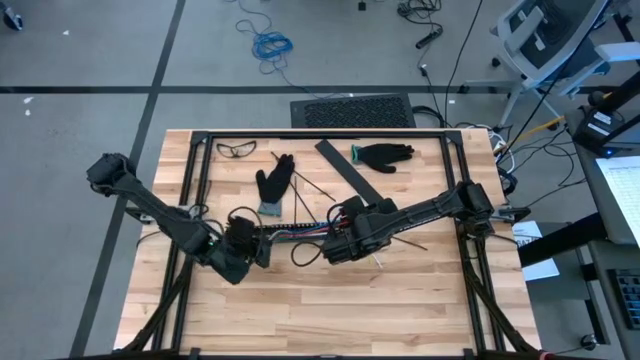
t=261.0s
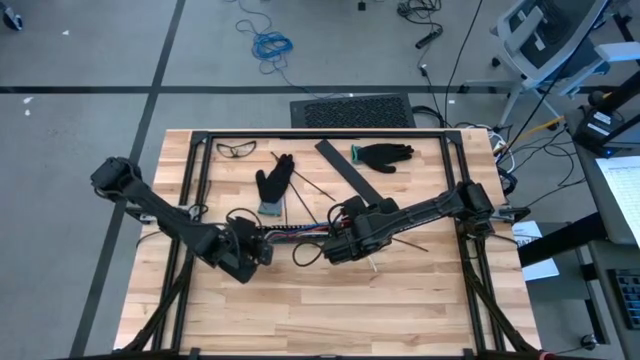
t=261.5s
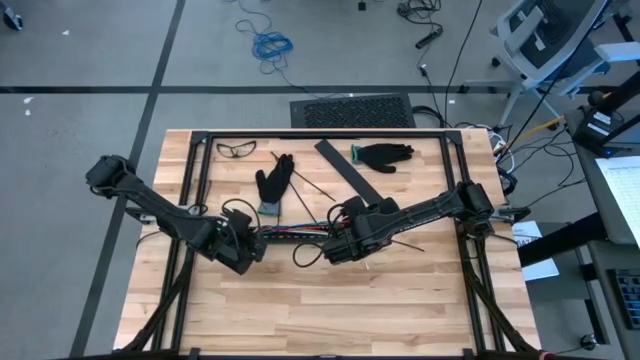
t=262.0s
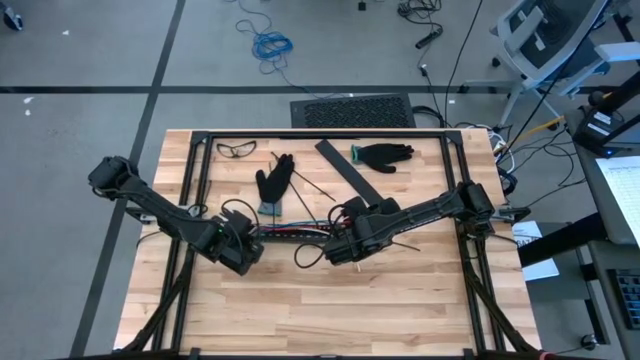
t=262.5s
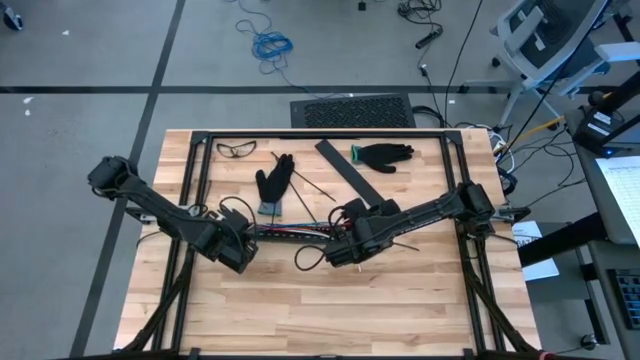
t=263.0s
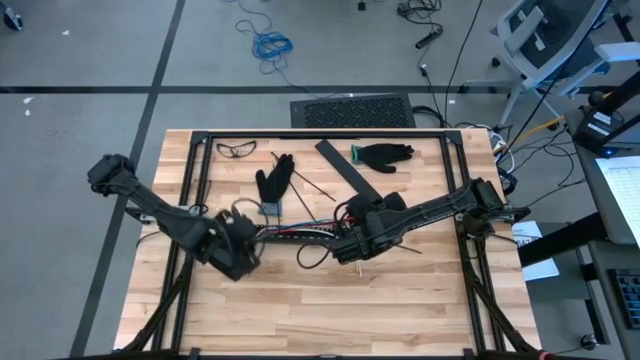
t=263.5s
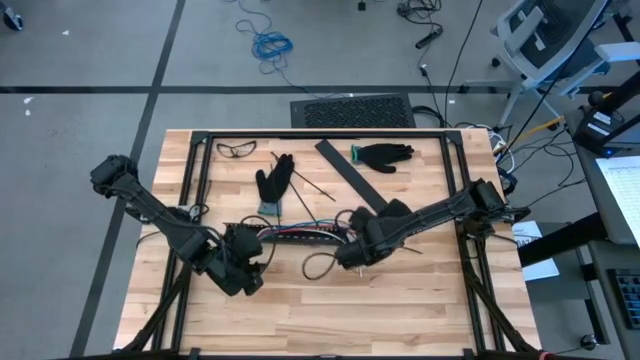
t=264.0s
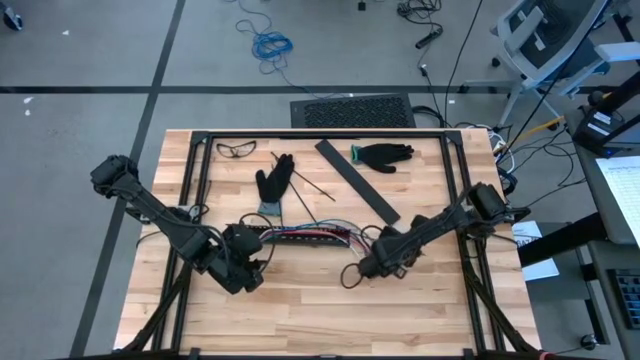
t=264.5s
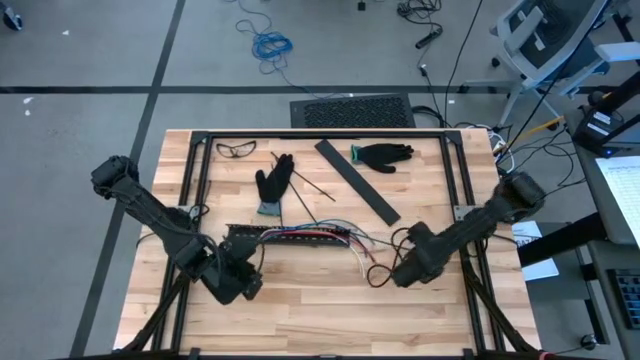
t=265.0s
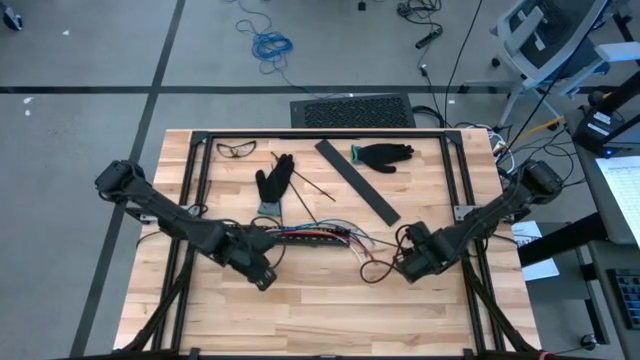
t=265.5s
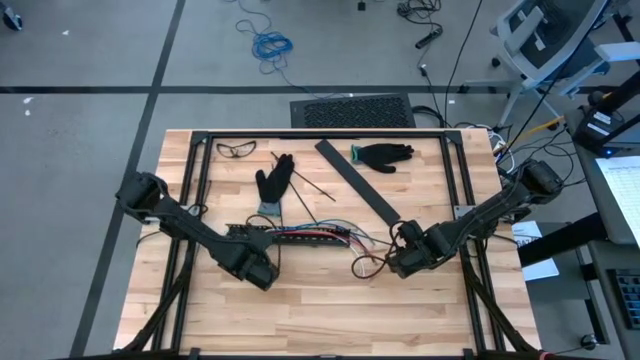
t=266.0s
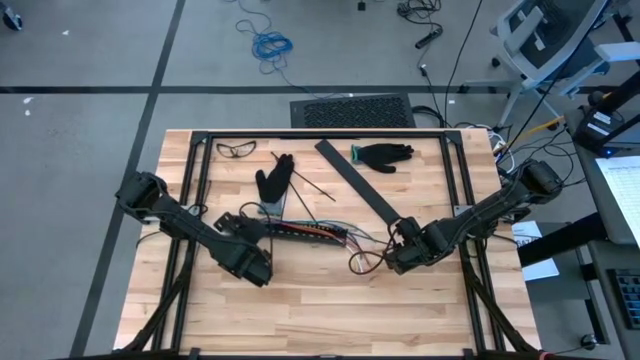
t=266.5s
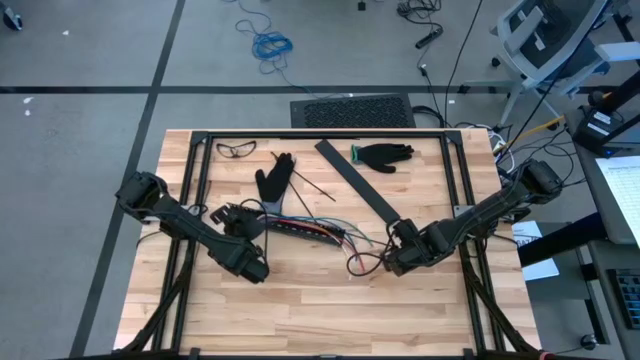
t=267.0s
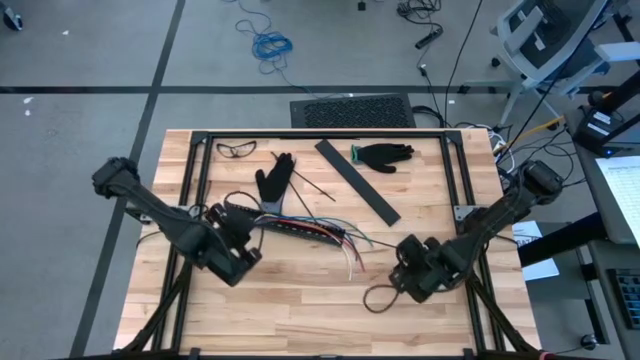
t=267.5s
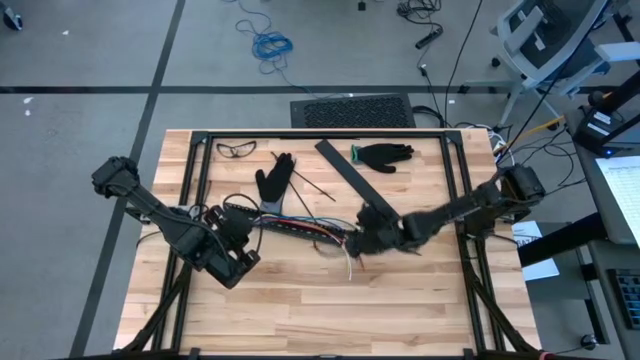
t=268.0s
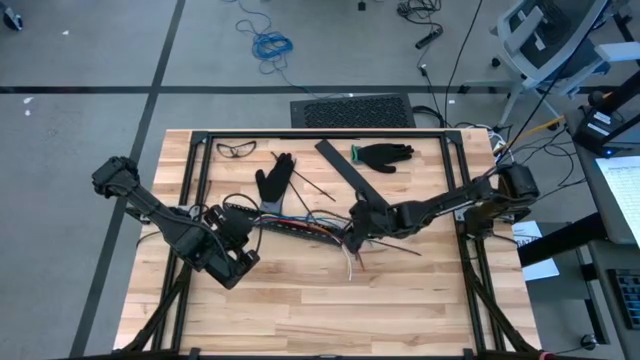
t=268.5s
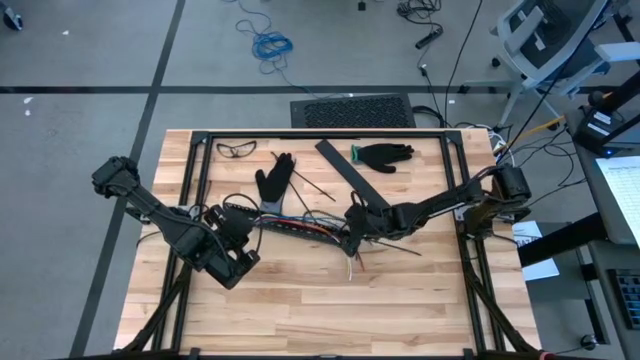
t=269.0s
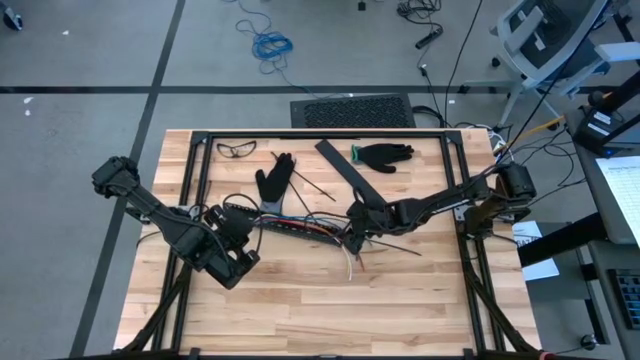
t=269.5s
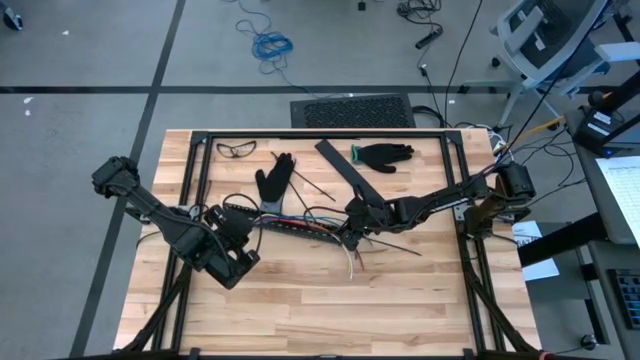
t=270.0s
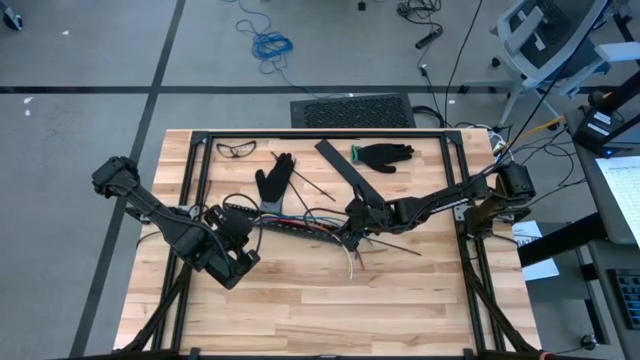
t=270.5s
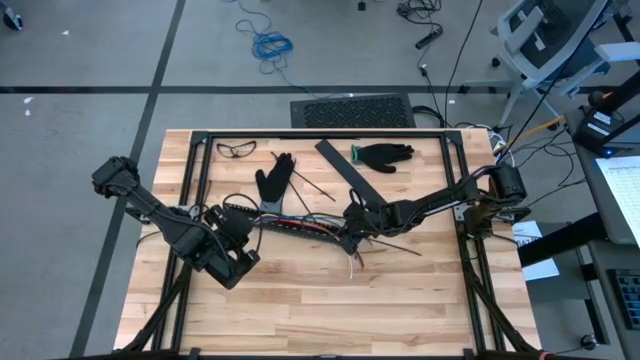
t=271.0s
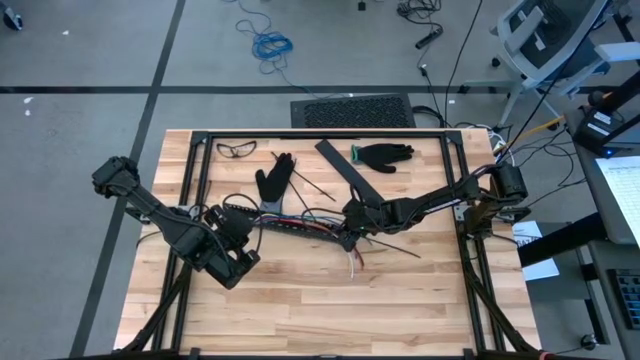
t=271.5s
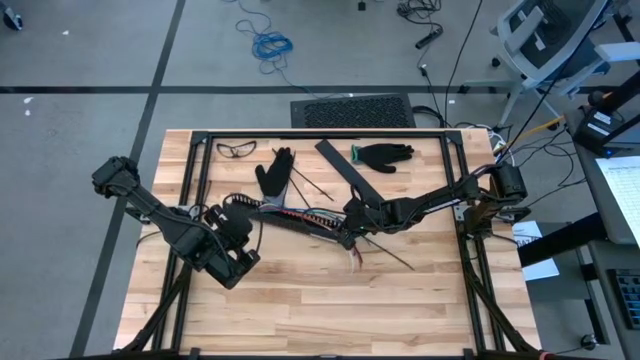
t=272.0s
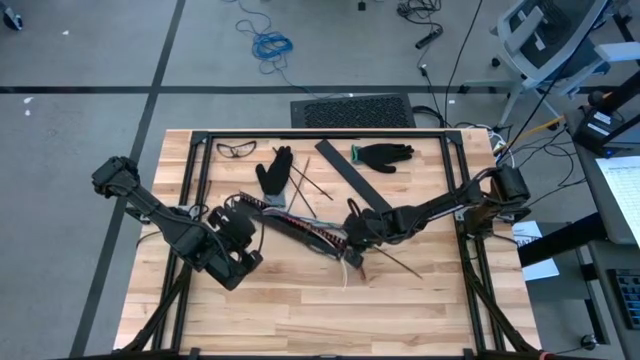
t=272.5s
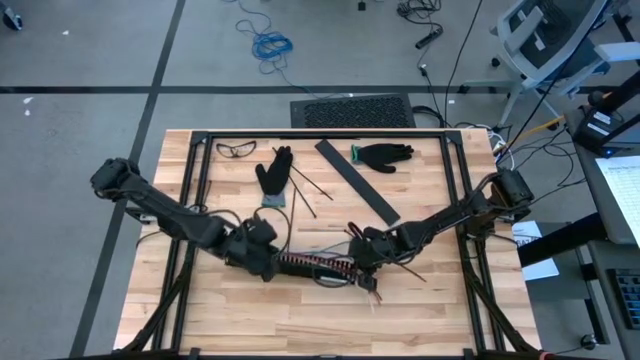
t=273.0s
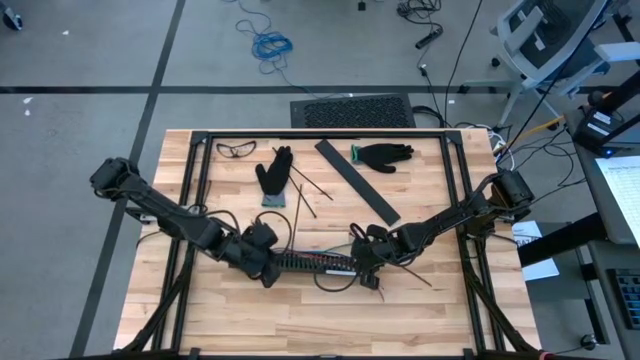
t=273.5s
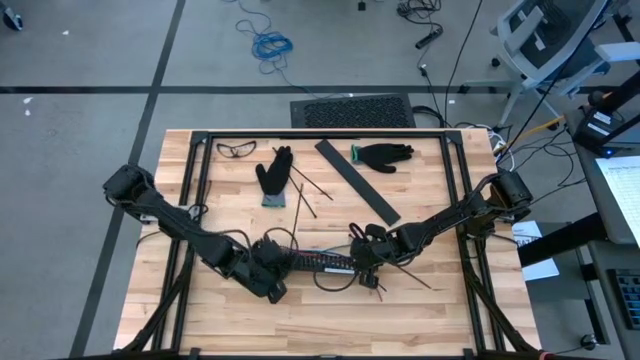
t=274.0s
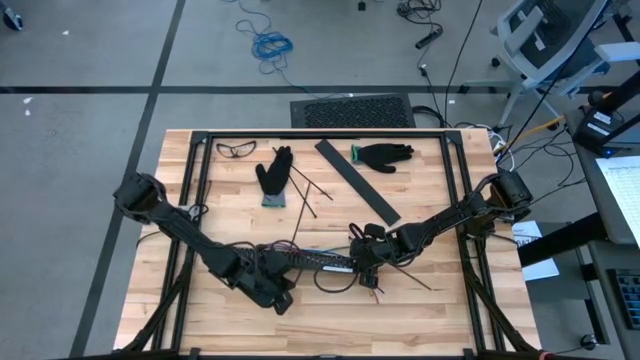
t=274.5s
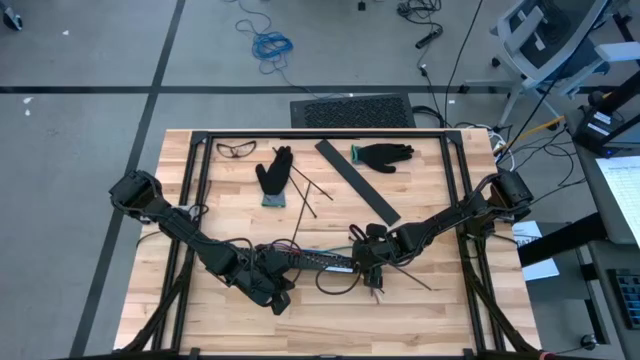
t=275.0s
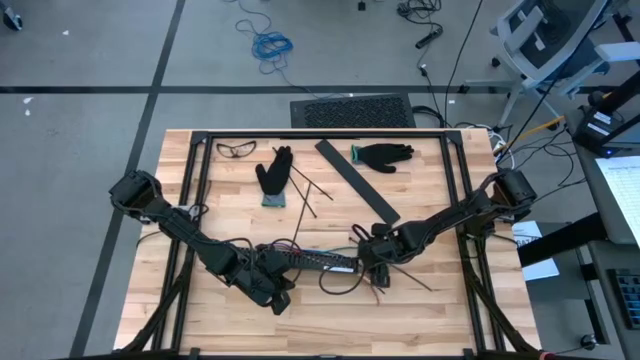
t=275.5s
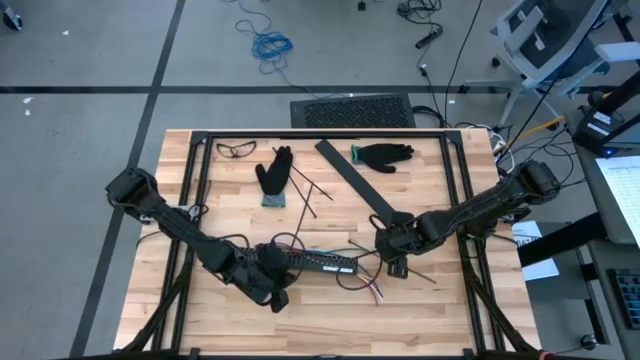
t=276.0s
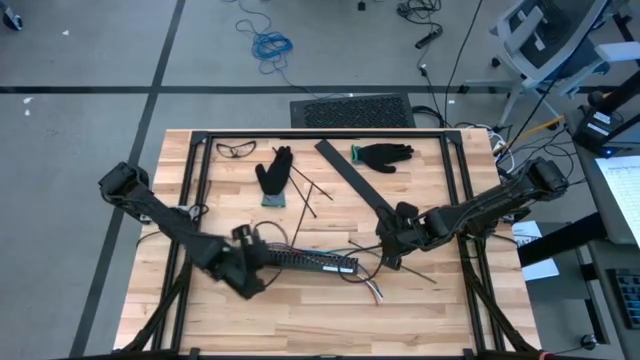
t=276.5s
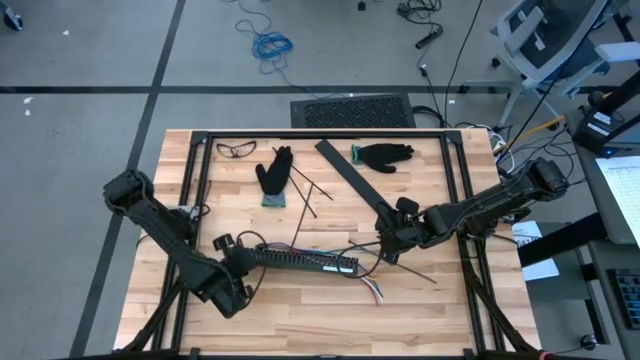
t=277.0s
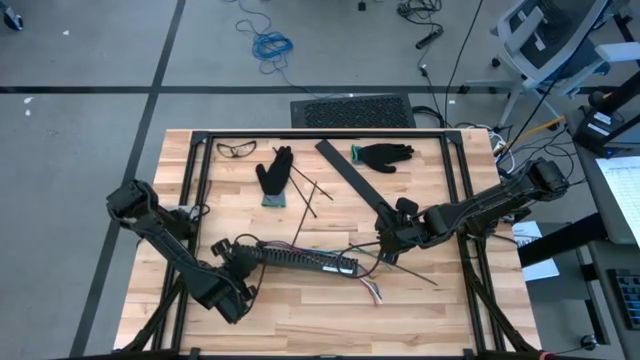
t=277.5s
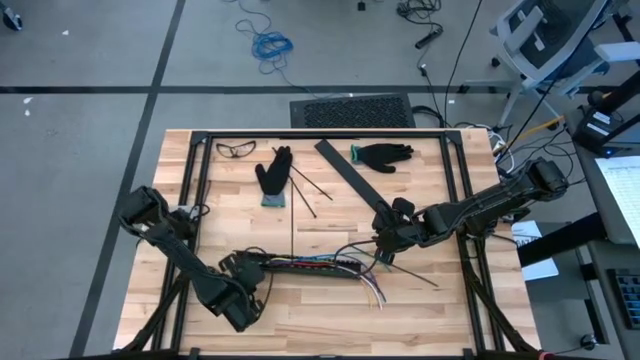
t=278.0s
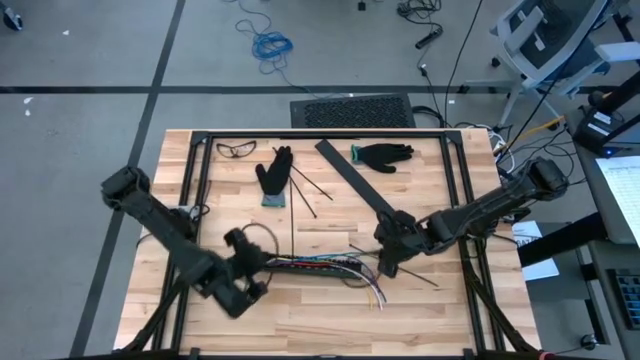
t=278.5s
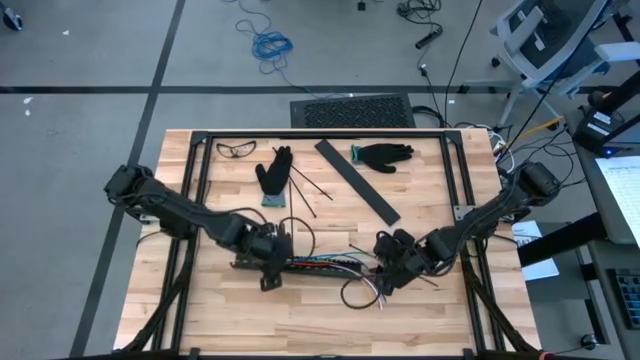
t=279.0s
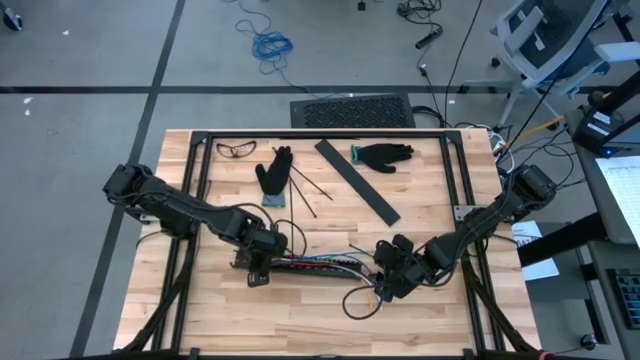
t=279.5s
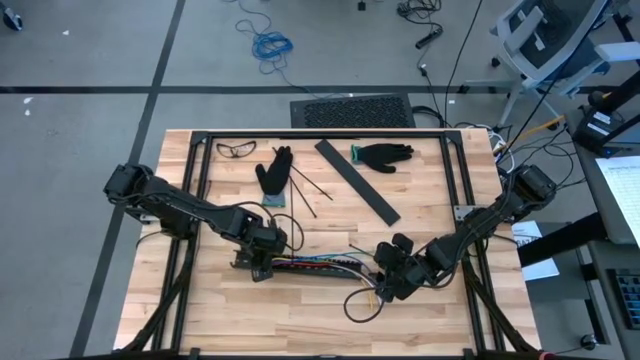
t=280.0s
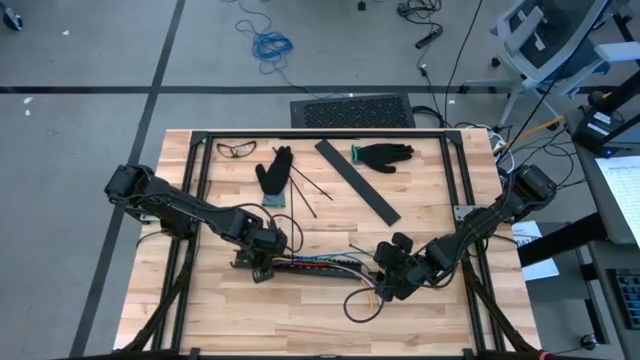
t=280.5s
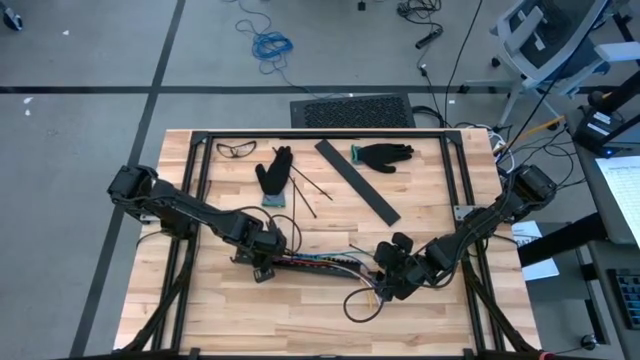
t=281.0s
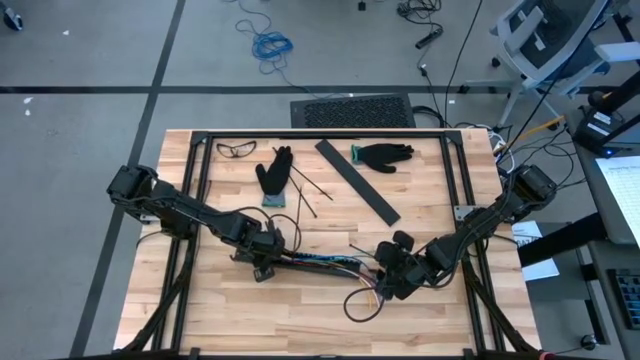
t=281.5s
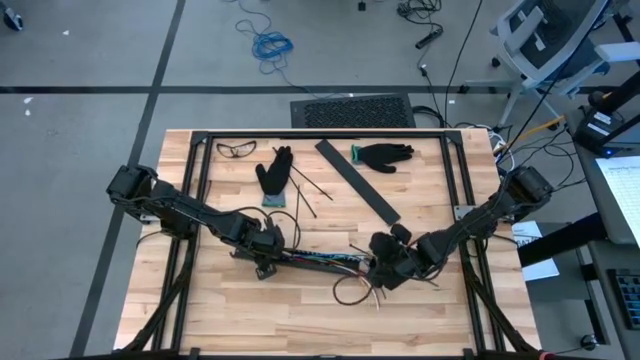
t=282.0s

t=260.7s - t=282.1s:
Task: Ziptie cables
Put the ziptied cables in the black cable duct
